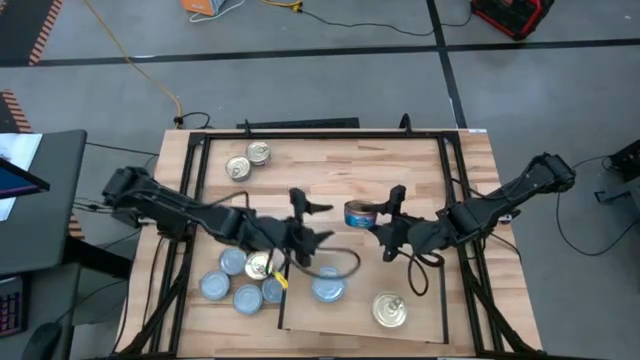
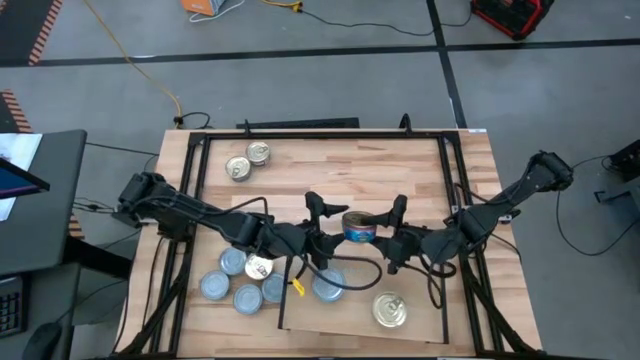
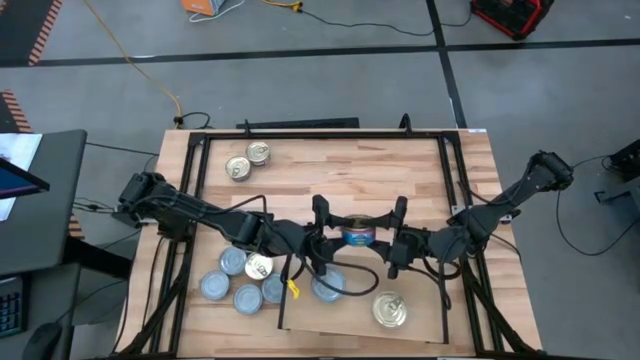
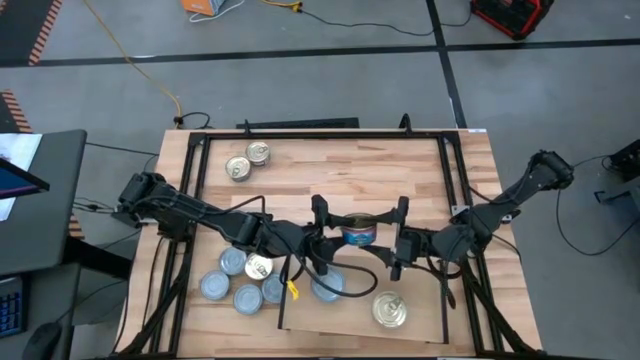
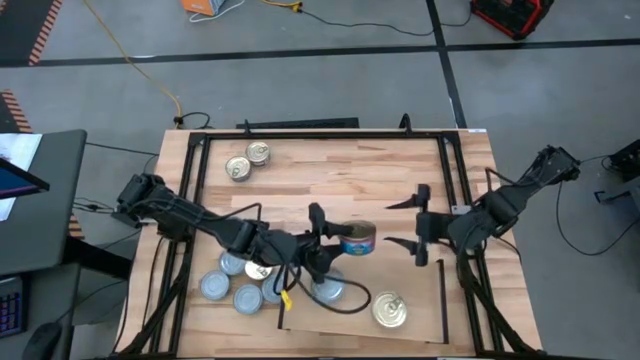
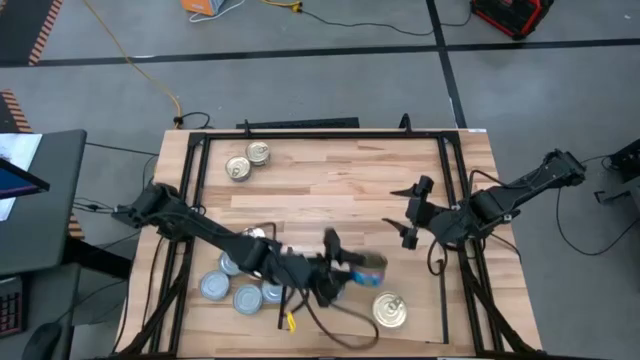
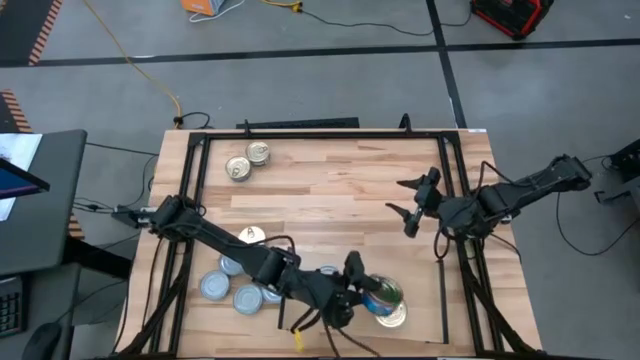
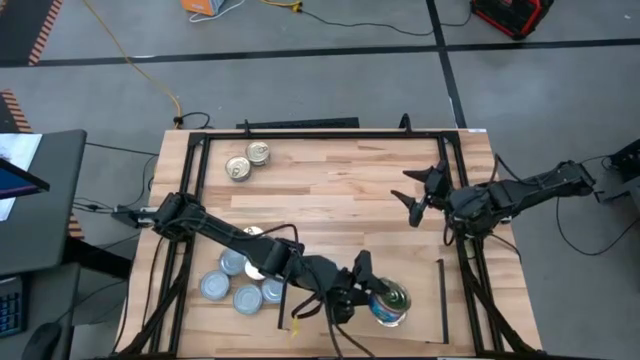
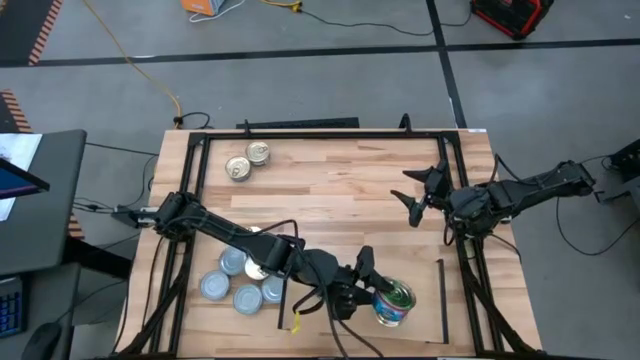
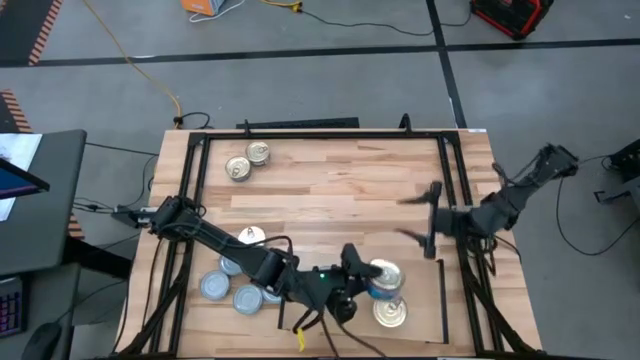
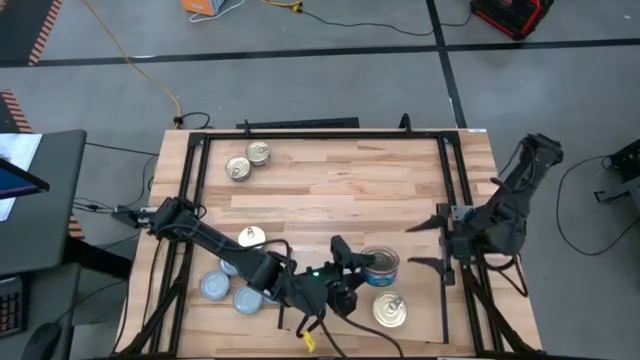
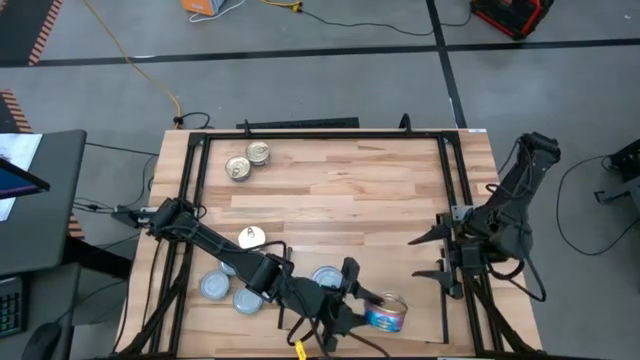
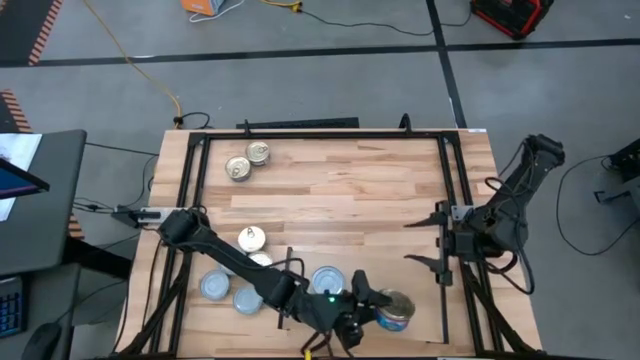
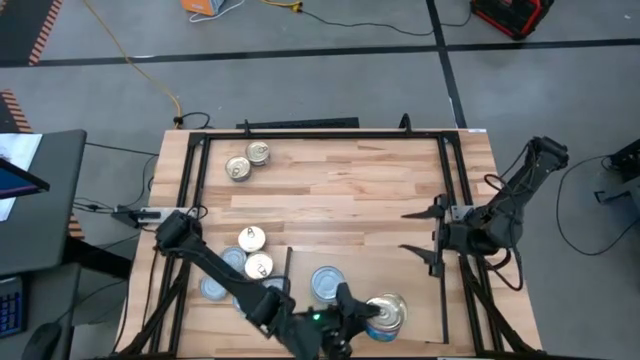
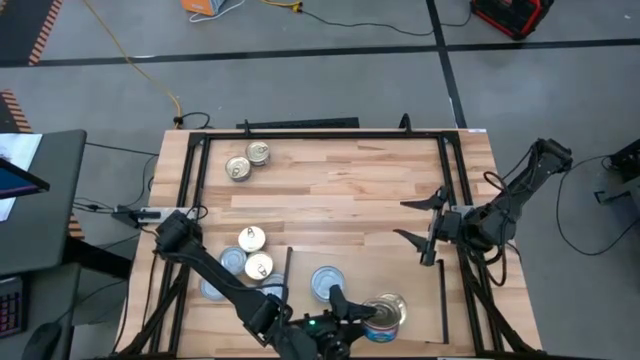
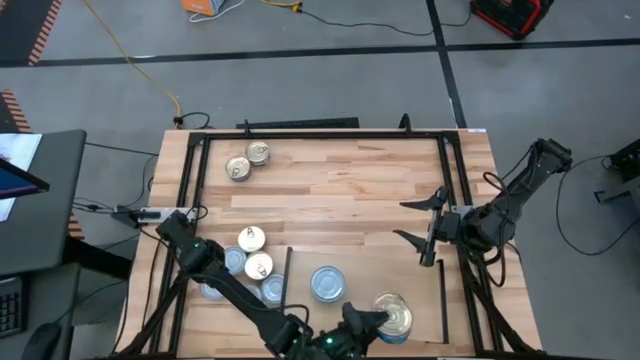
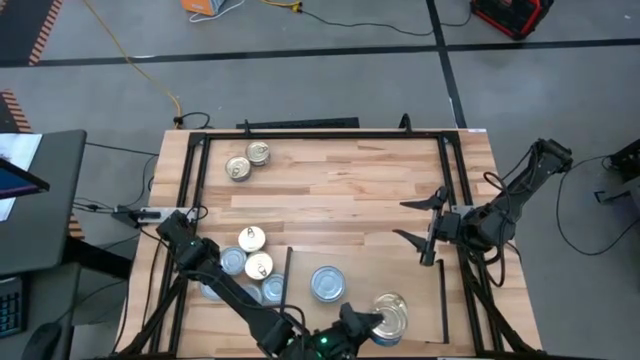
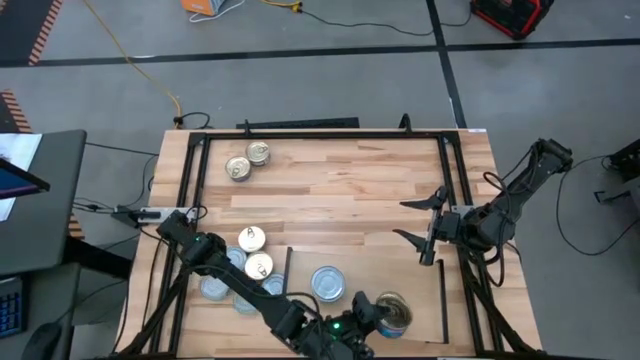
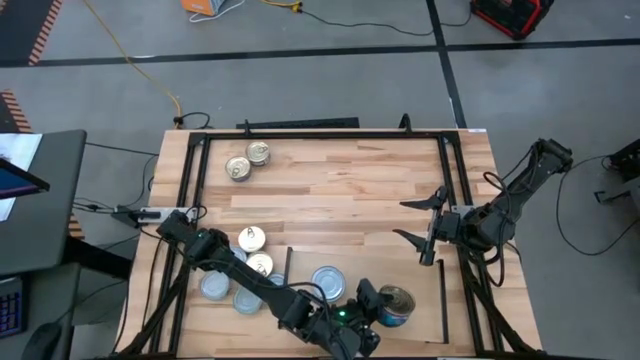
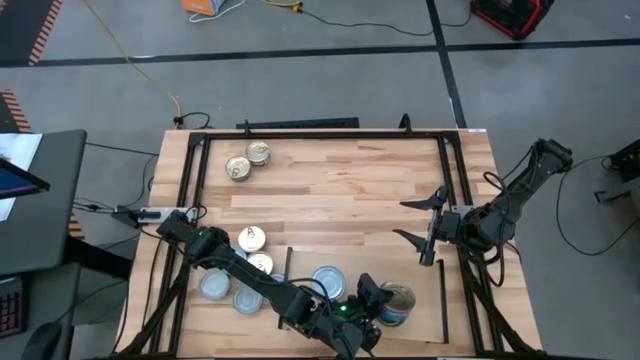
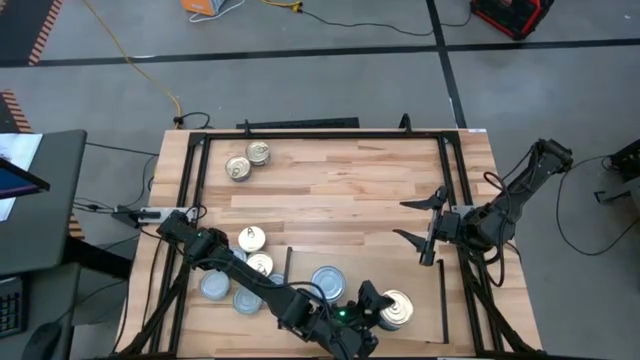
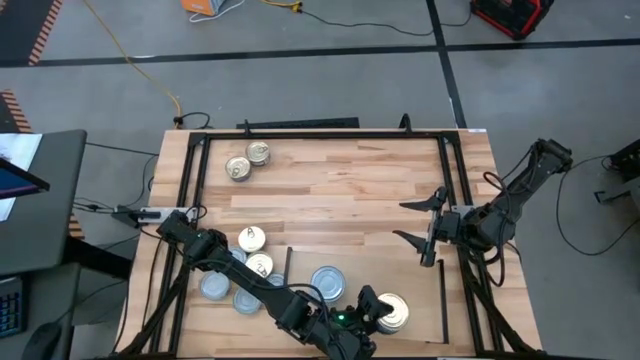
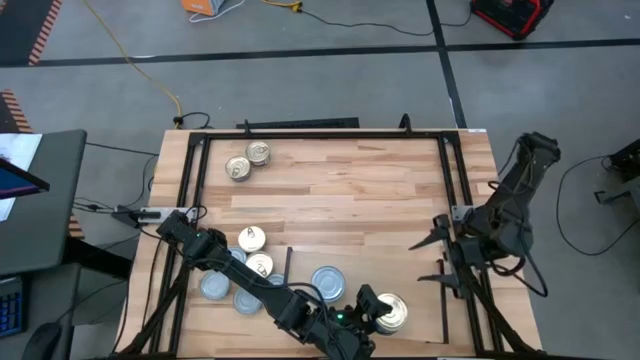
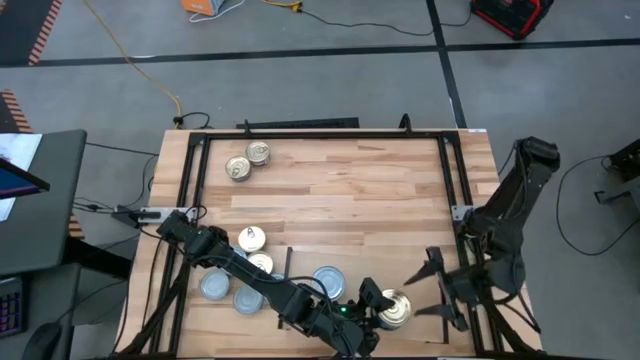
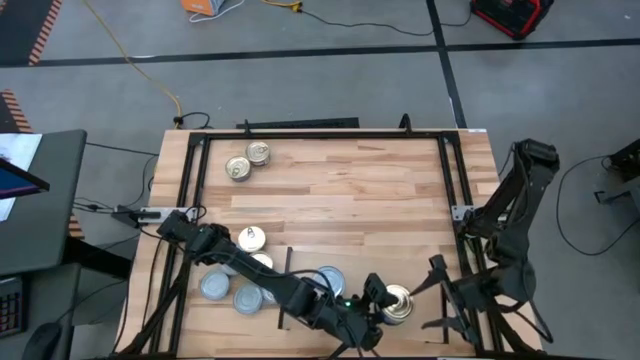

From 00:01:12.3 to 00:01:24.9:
Task: Stack canned seafood by type on shelf
Stack the blue-pink tuna can on the top of the blue-pink tuna can on the shelf

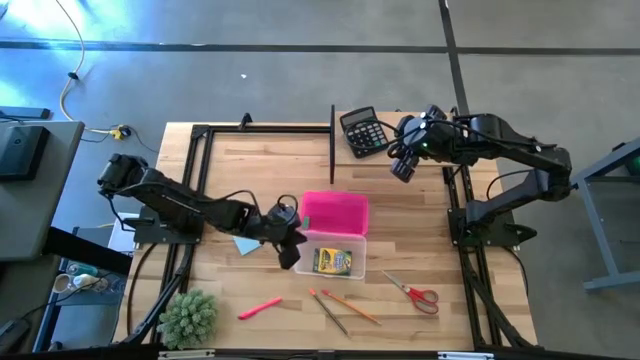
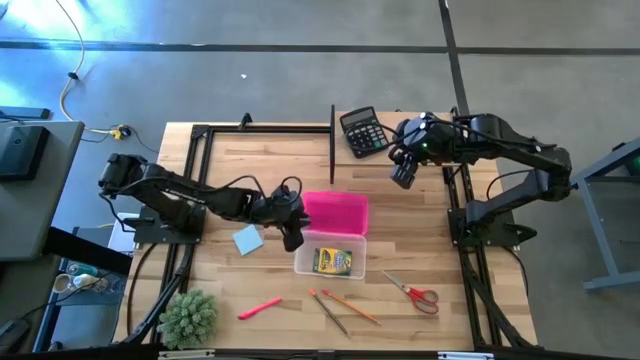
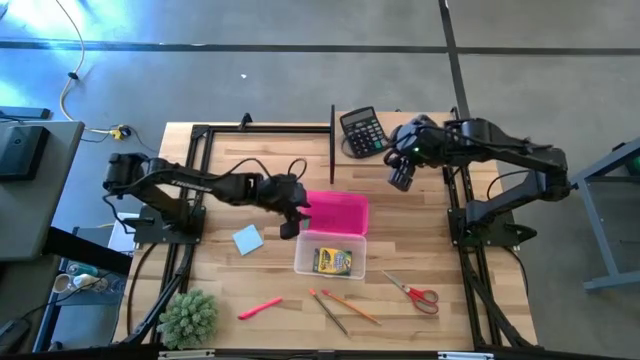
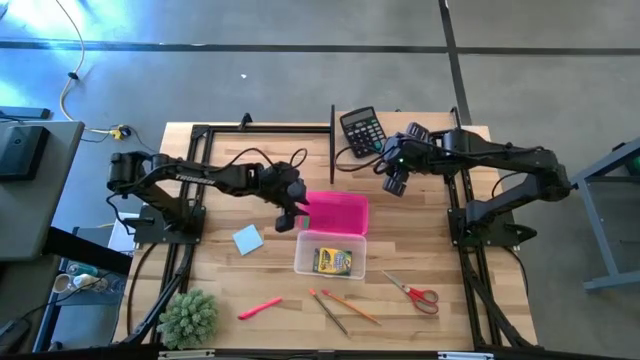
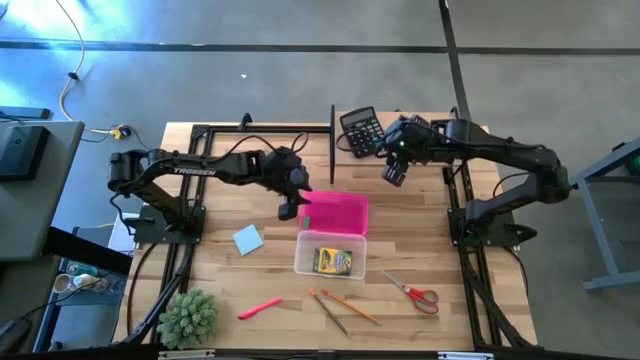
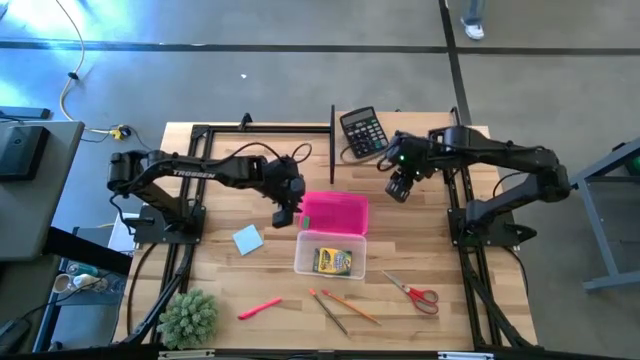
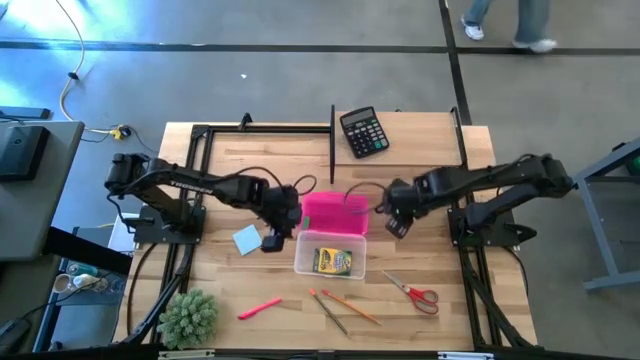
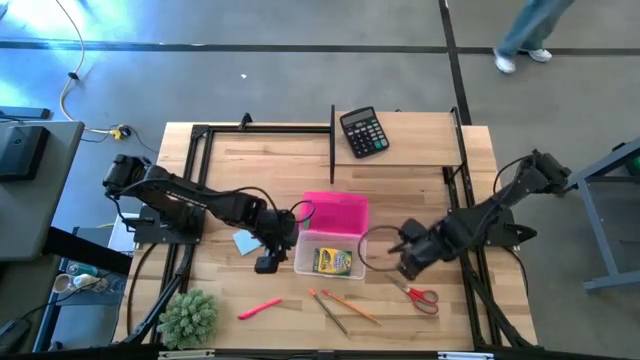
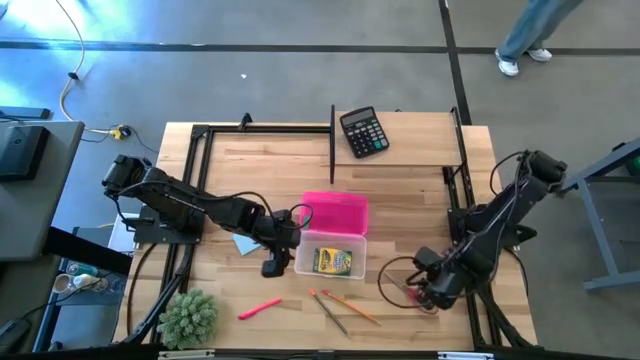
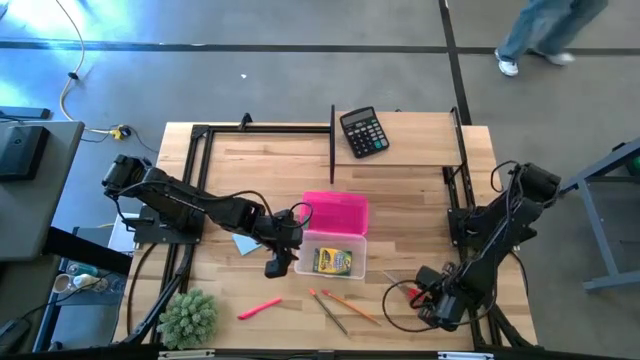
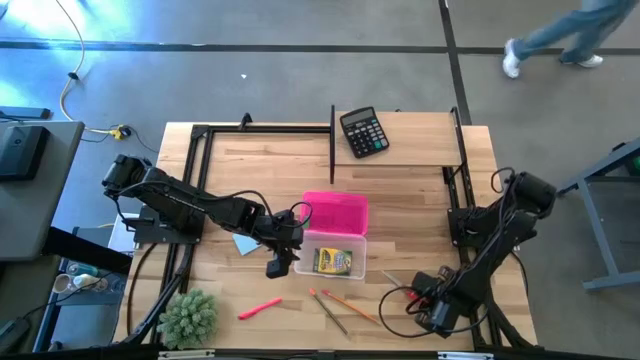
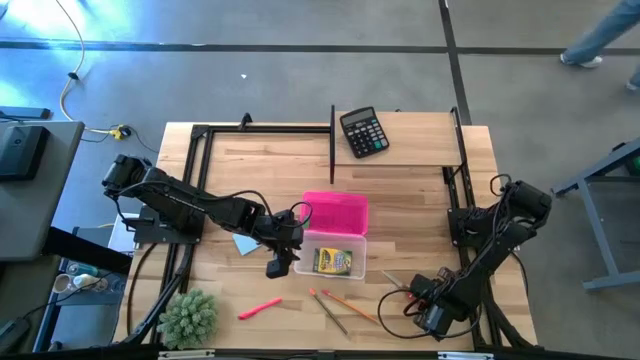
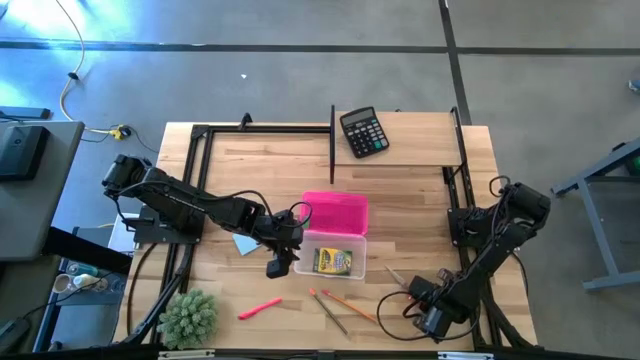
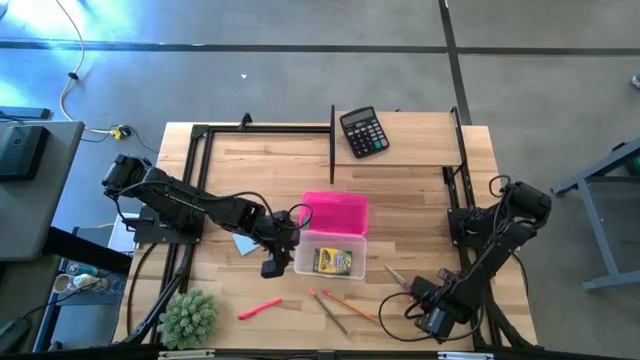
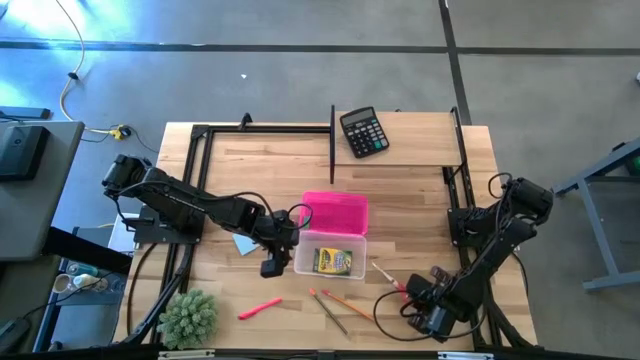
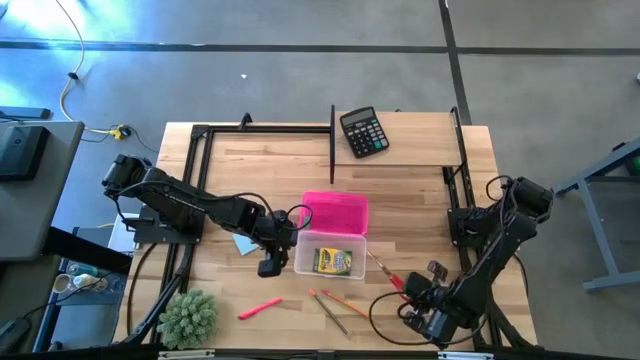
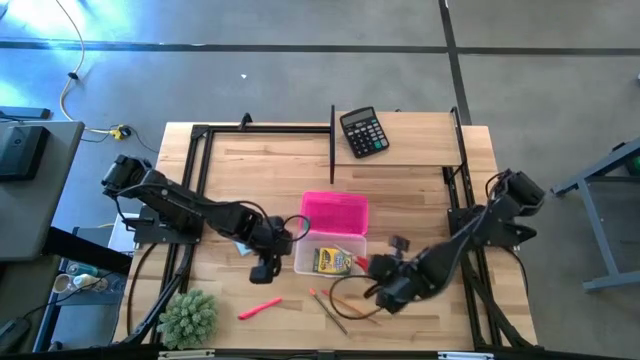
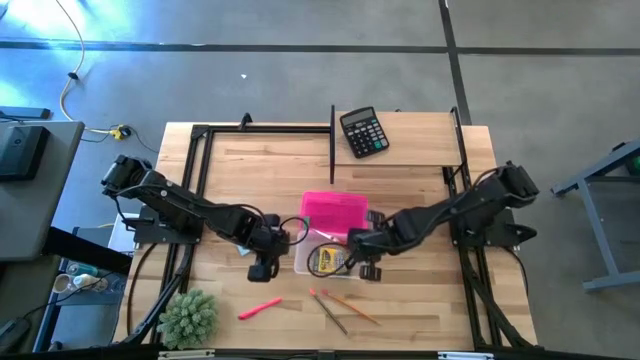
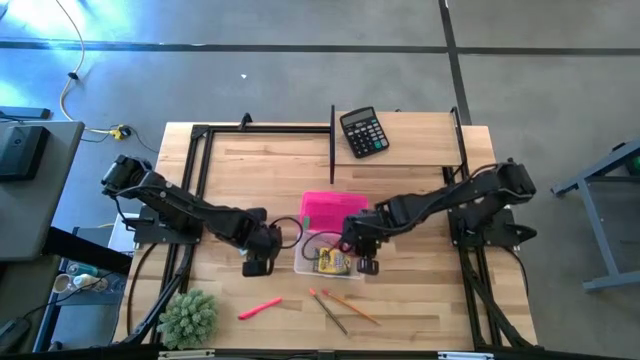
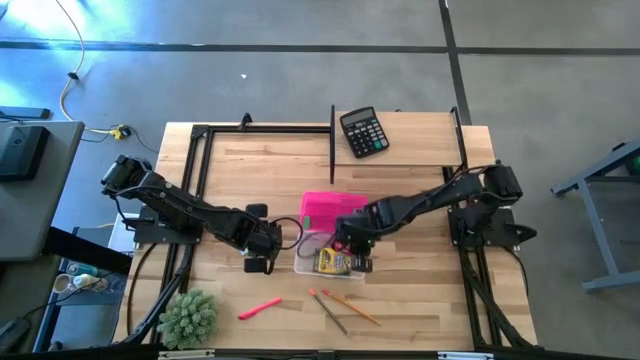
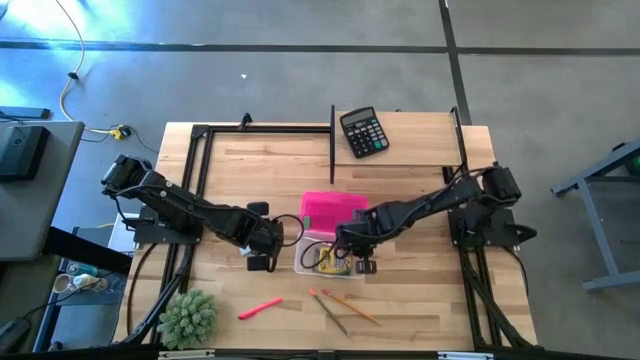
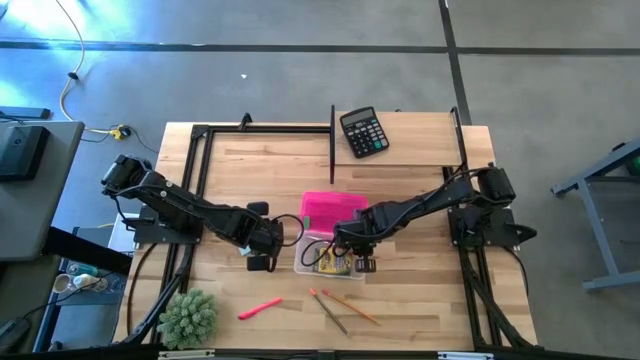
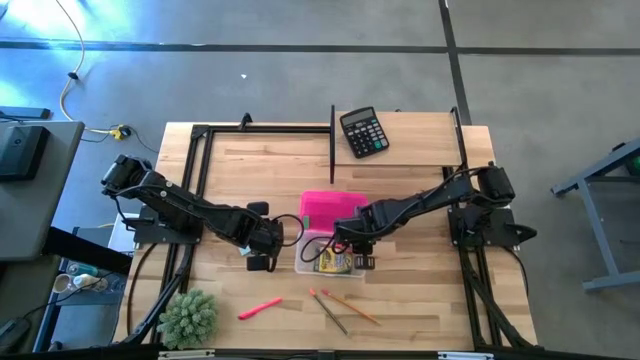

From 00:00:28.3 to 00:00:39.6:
Task: Pack school essentials
Put the orange scissors into the pink supply box
